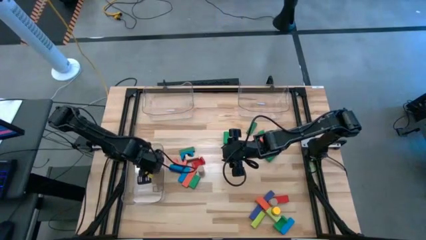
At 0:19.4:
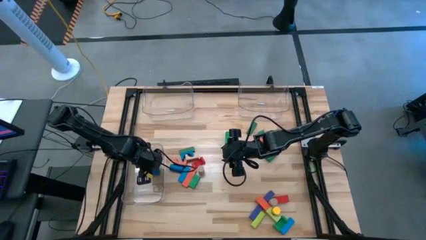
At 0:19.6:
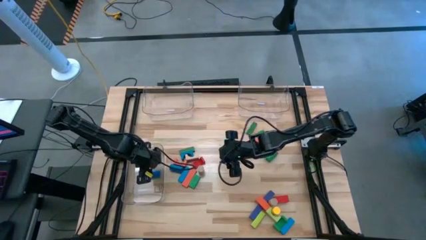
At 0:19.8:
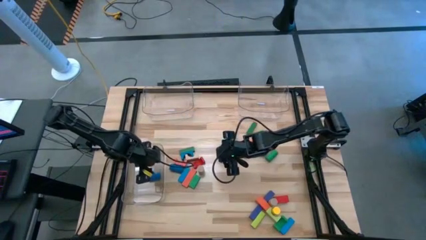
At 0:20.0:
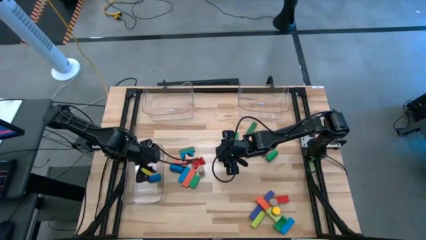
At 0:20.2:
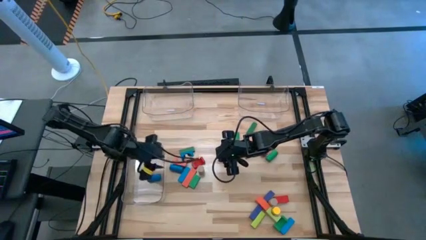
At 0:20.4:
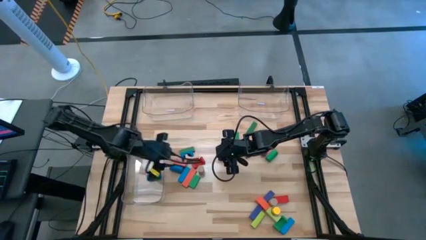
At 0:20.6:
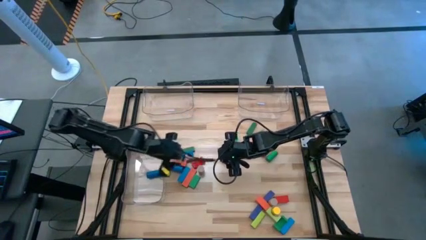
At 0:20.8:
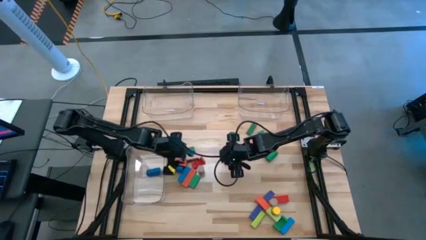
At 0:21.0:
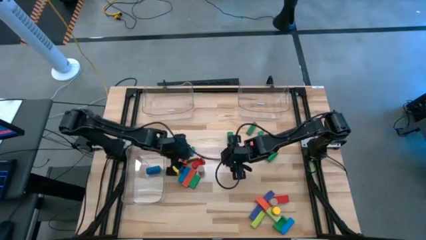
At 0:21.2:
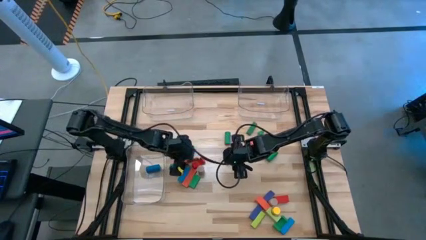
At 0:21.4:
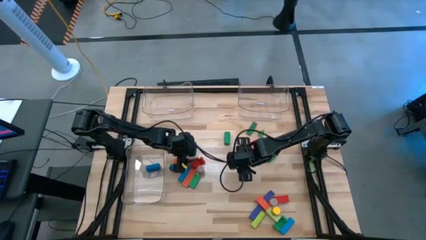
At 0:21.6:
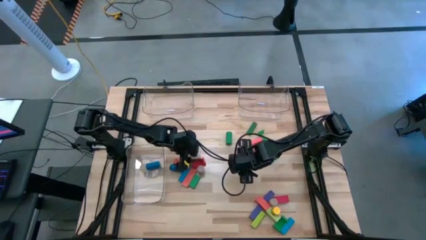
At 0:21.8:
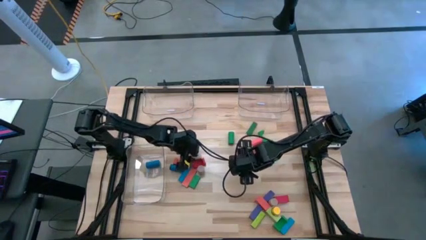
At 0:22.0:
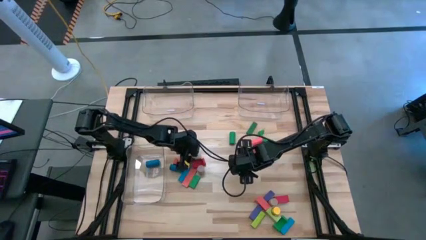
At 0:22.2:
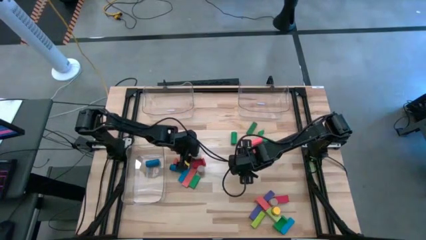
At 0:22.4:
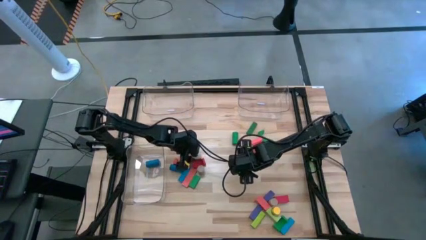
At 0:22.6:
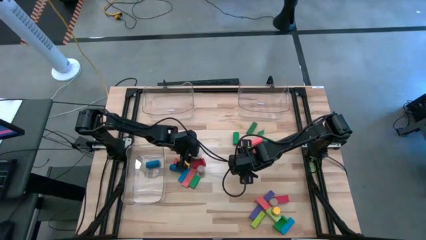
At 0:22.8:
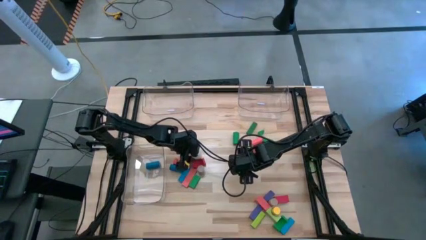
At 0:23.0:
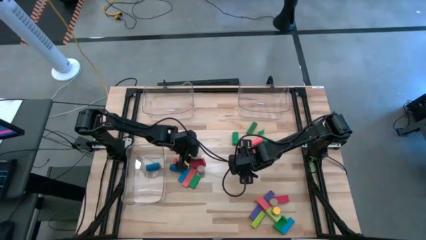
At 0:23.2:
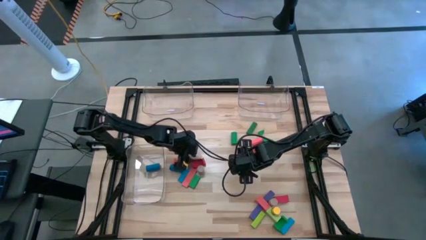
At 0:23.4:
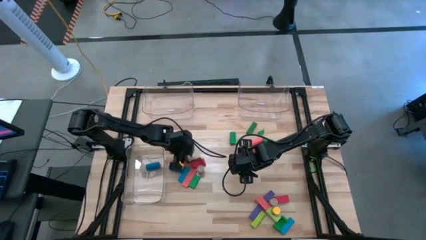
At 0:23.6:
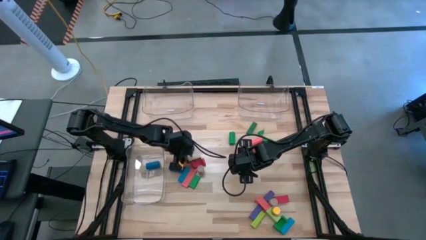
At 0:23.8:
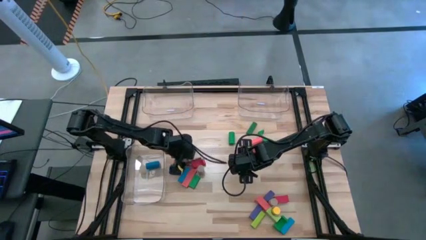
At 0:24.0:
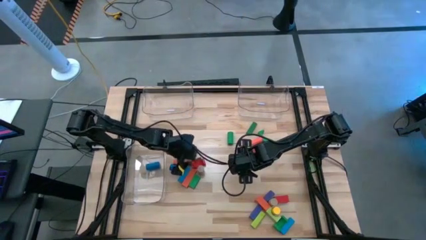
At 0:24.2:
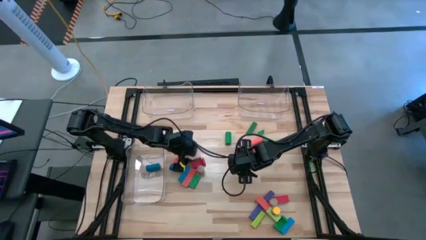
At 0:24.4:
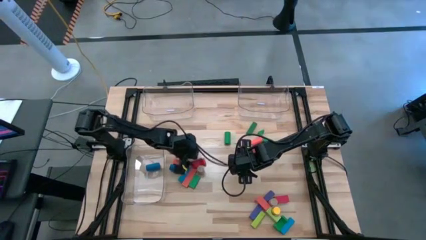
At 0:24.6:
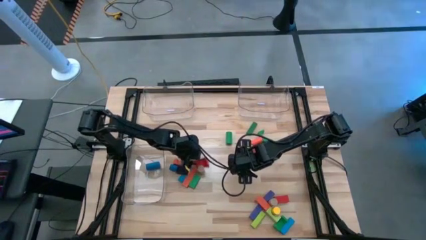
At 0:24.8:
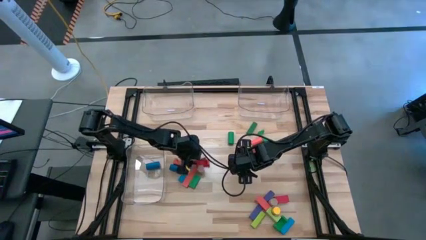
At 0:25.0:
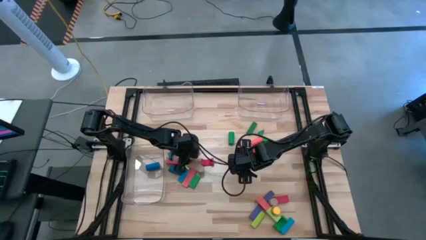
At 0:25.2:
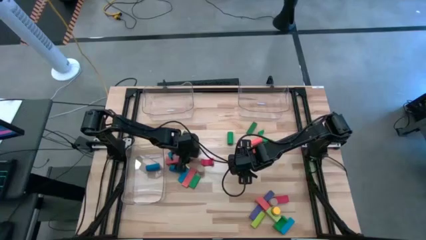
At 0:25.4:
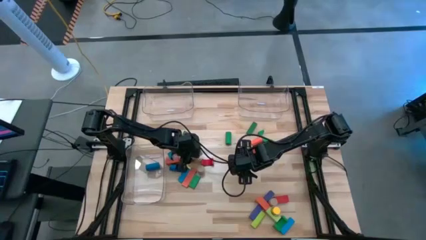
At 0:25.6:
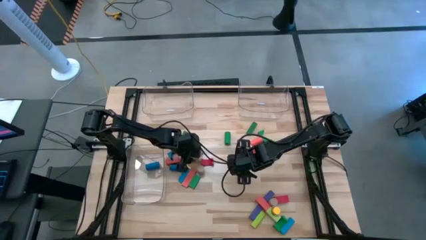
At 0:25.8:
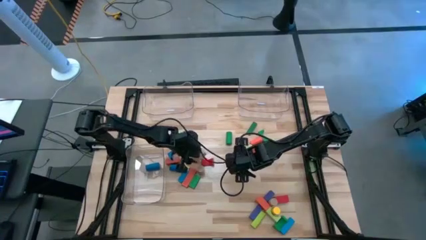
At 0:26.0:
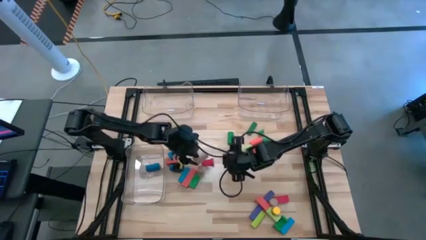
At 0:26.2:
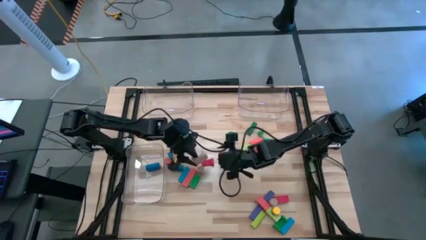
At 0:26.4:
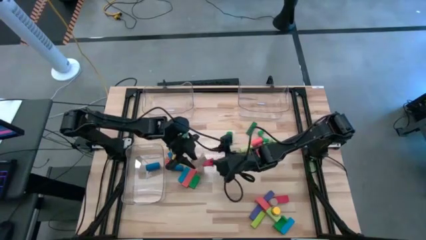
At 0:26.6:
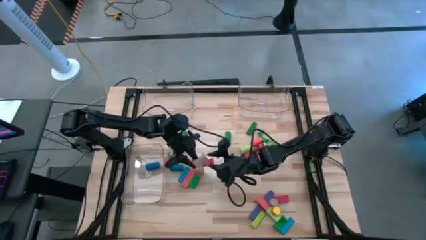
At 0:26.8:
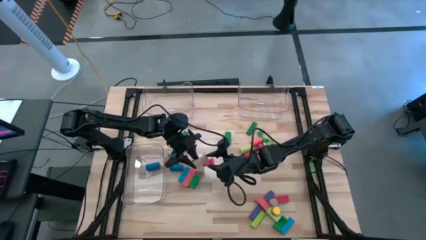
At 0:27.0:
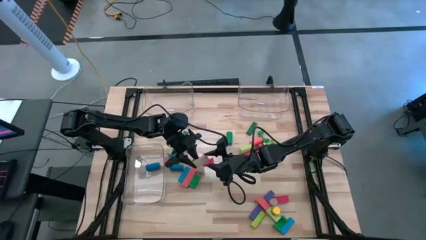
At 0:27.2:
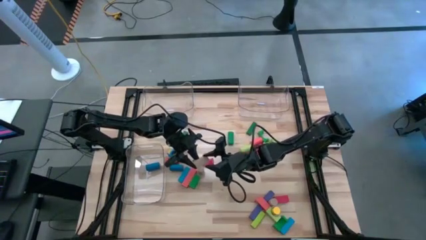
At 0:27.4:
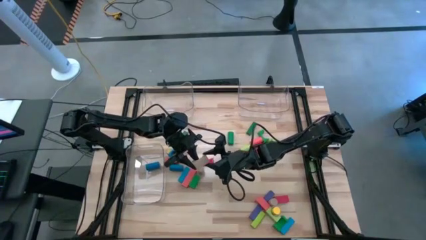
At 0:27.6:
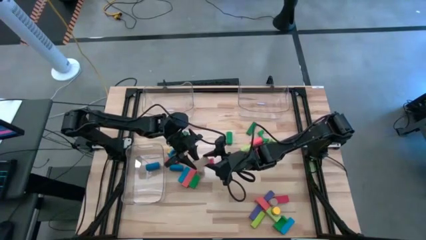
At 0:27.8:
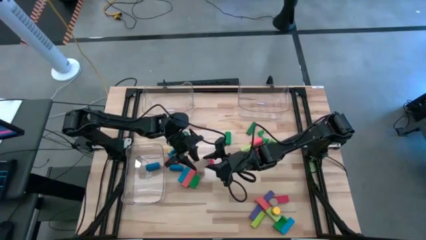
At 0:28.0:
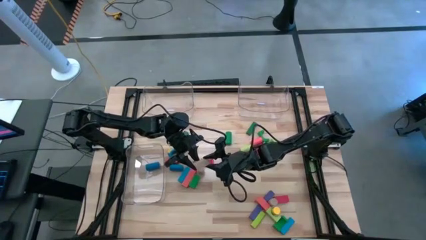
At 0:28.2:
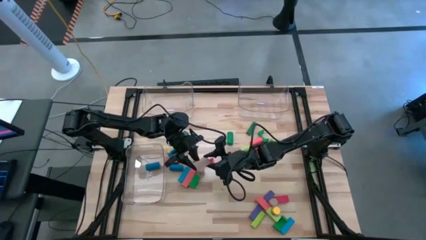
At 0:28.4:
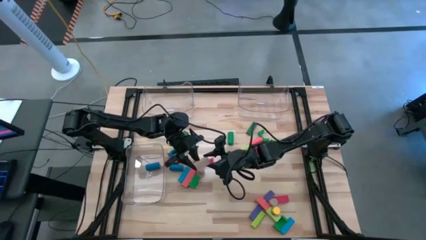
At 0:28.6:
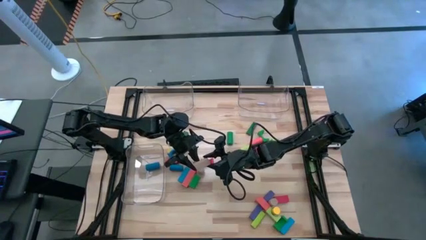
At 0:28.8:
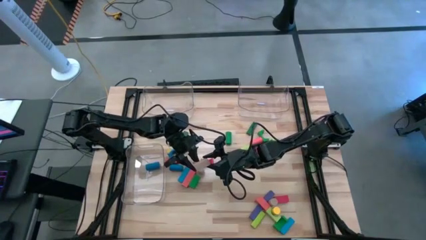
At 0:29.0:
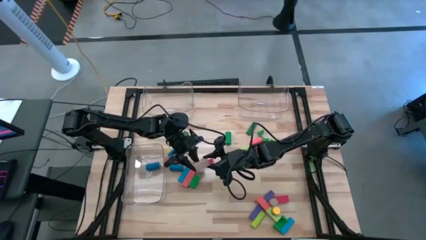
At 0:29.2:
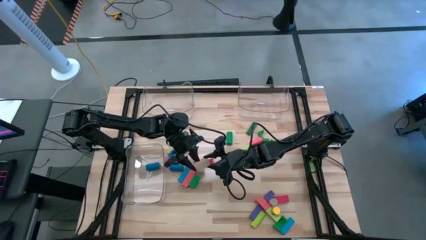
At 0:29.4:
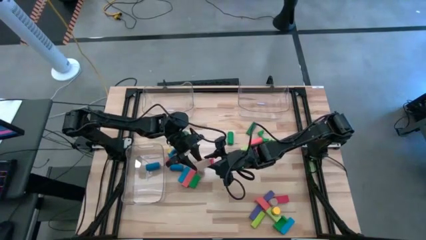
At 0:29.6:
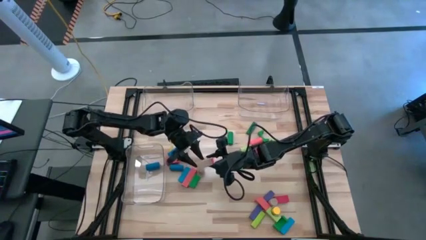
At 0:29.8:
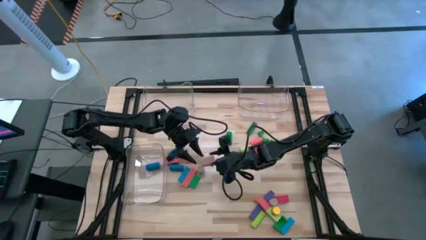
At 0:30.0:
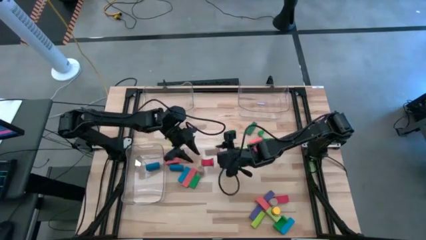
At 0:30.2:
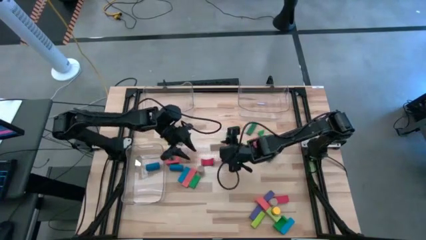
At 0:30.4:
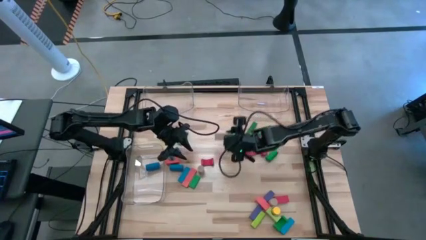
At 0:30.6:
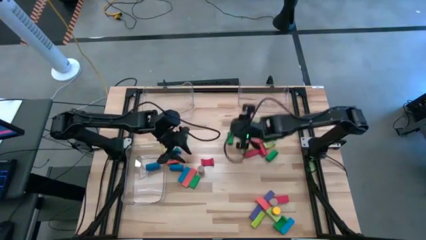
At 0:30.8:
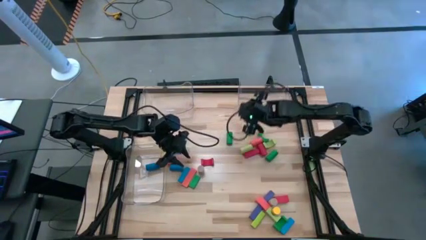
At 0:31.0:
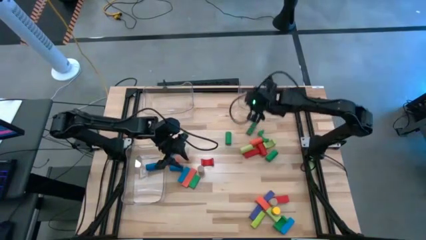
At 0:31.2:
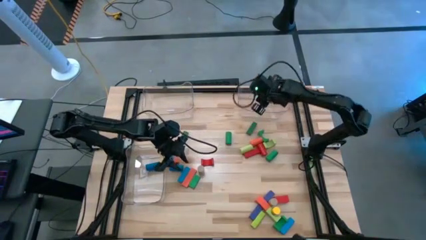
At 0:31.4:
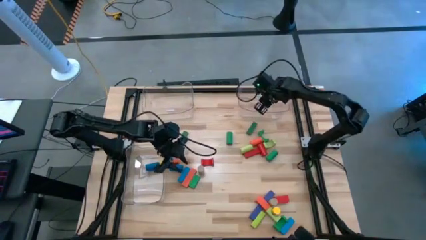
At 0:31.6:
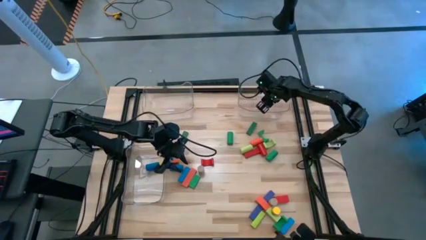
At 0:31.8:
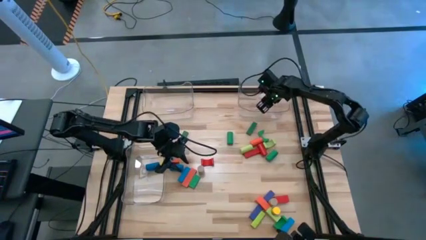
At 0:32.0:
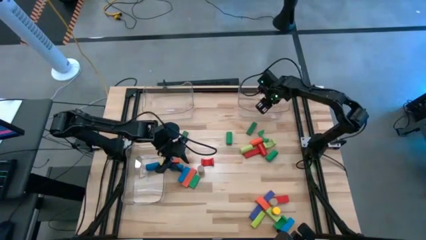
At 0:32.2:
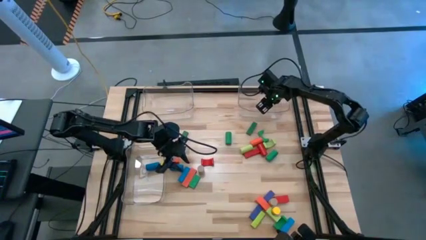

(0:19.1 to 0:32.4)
Task: Sort blocks by size
Put the brown arch block into the top right transparent bin

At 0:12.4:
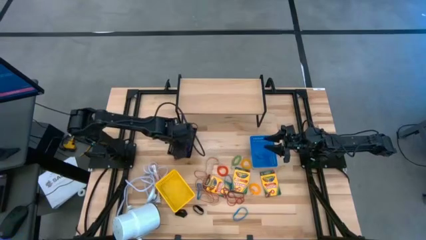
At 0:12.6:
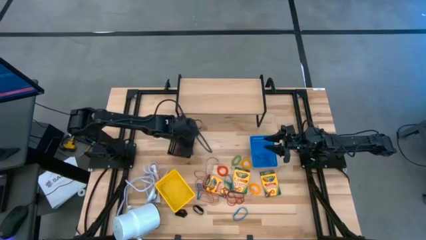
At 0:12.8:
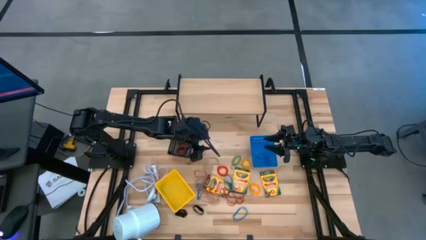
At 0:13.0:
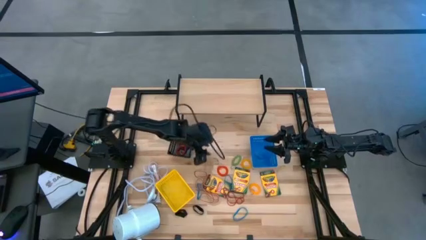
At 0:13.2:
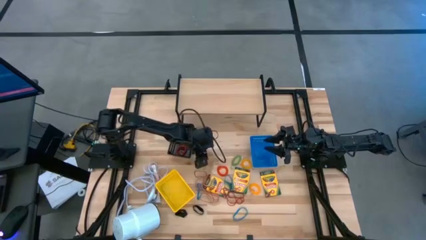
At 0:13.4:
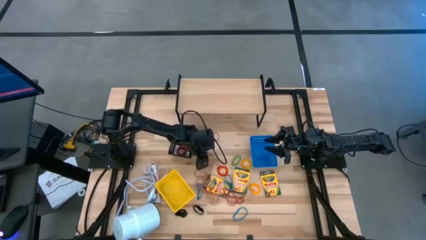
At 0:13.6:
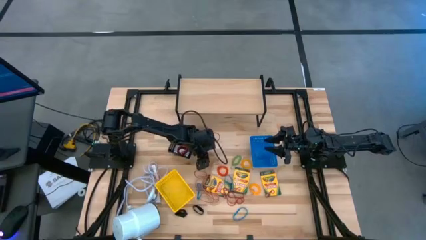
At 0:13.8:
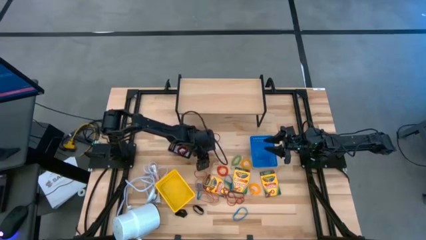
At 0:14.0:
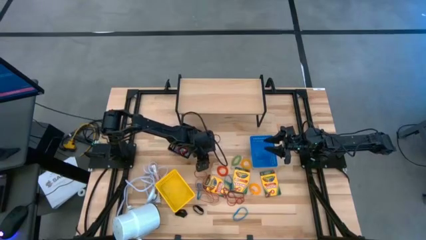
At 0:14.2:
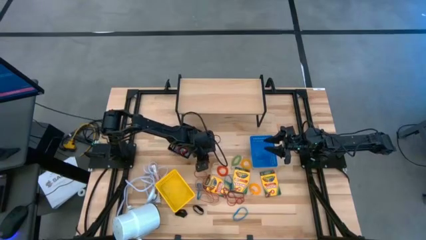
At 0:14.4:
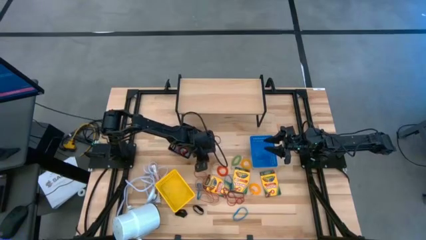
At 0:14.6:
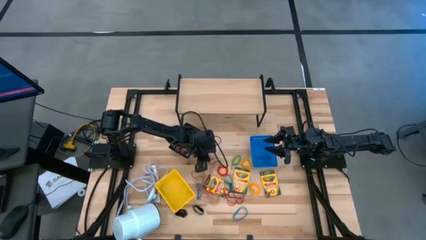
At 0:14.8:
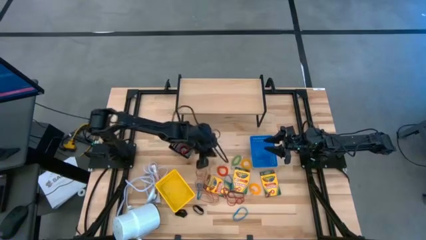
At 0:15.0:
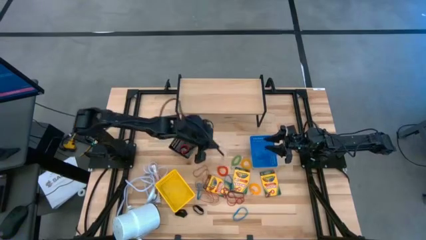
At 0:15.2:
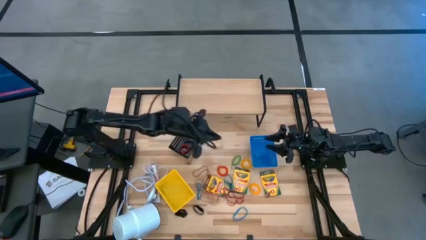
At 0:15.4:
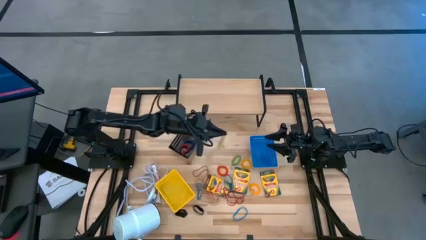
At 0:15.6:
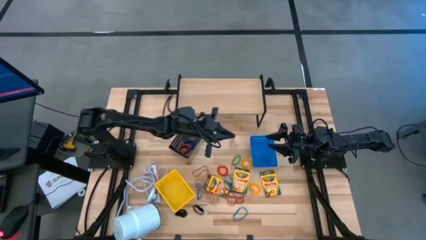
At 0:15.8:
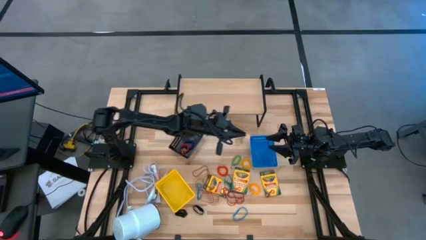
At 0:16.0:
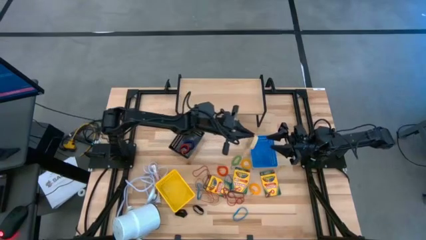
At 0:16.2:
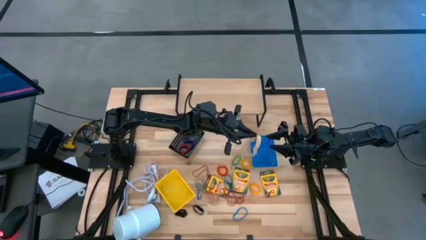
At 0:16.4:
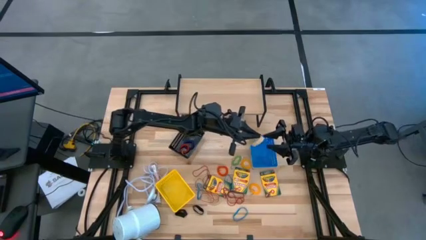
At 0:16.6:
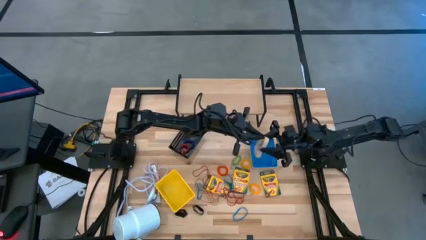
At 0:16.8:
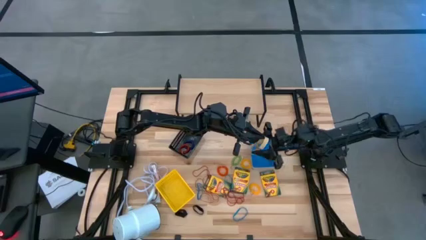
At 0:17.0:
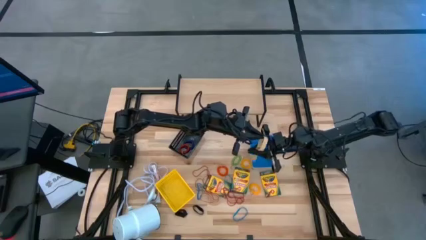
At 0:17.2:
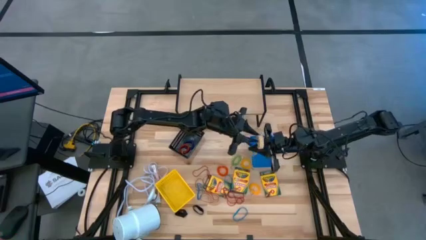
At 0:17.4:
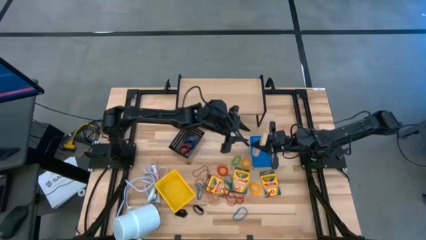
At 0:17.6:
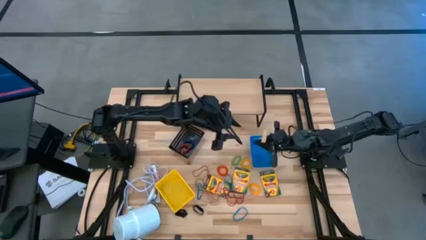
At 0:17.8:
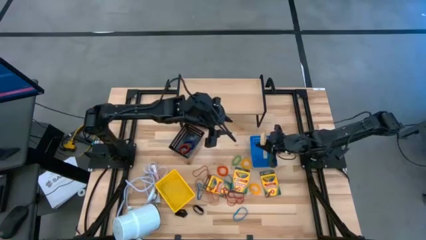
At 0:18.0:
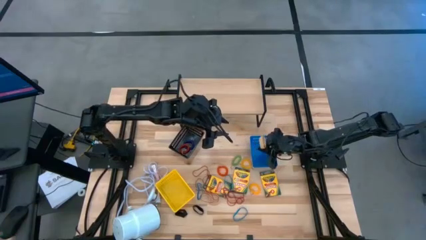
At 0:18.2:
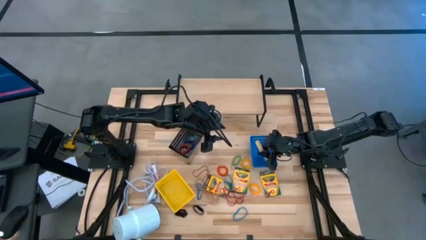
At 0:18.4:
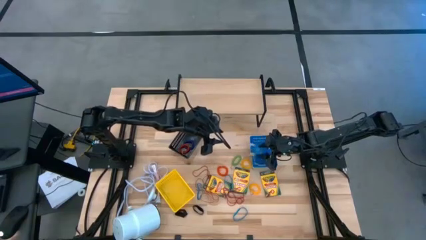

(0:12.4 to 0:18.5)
Task: Pick & Place Office Desk Supplies
Put the white rubber band into the blue bin
